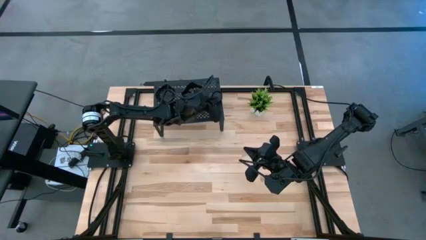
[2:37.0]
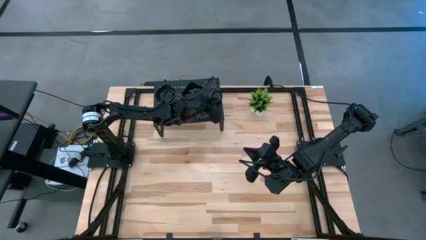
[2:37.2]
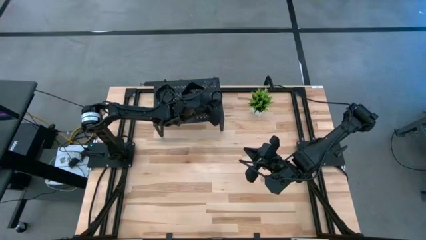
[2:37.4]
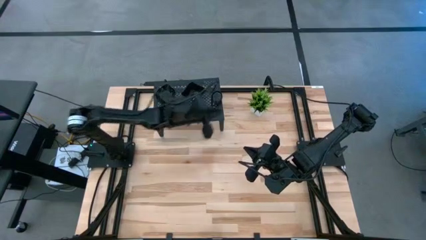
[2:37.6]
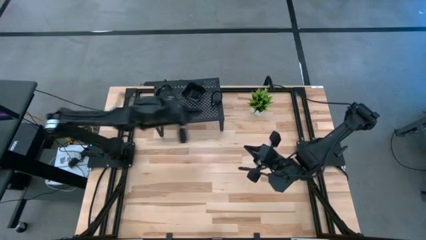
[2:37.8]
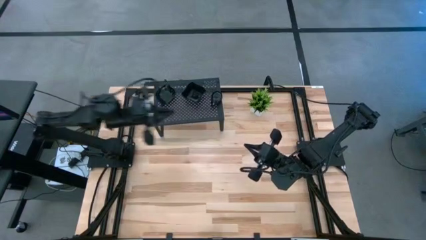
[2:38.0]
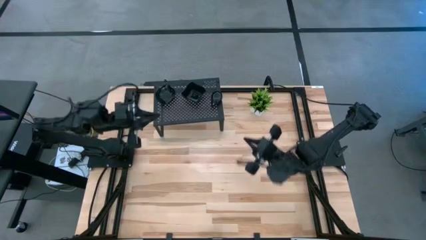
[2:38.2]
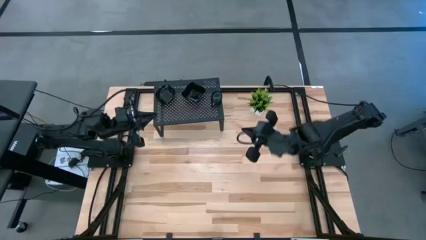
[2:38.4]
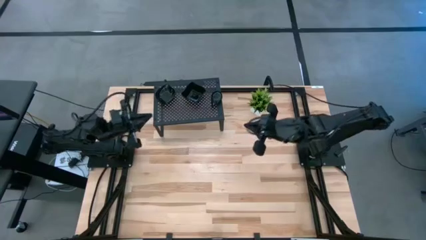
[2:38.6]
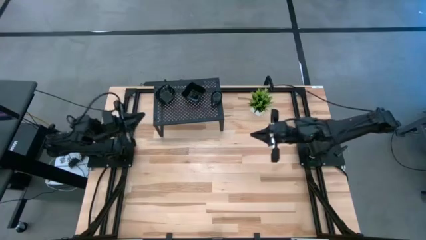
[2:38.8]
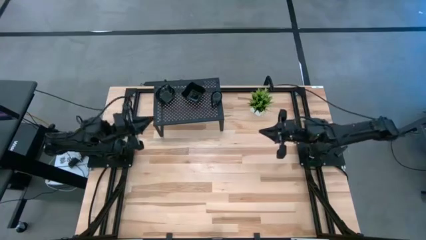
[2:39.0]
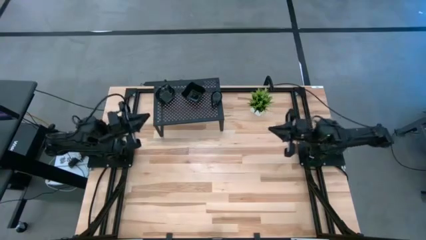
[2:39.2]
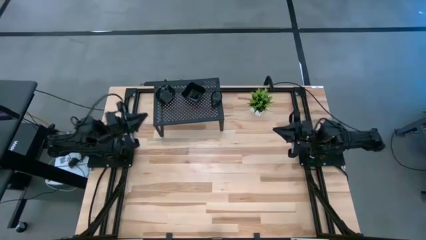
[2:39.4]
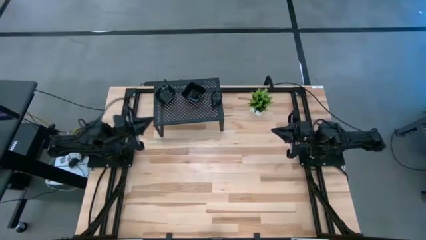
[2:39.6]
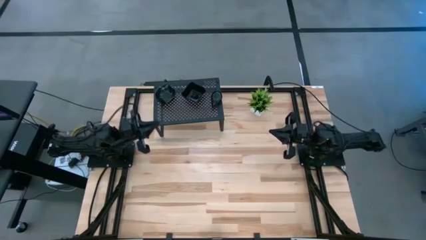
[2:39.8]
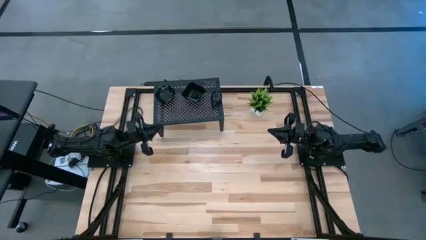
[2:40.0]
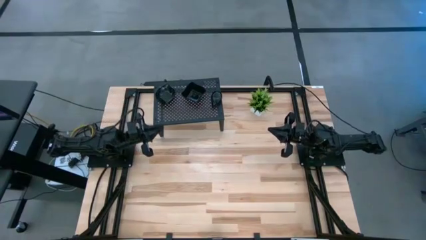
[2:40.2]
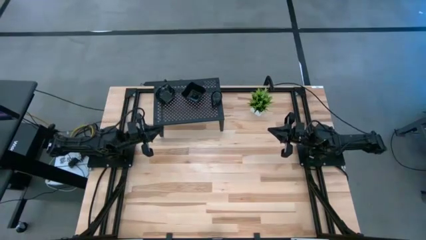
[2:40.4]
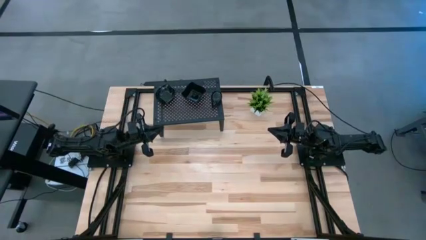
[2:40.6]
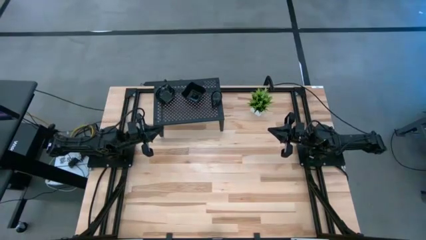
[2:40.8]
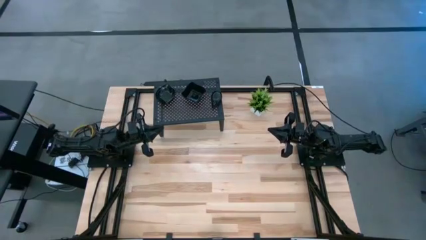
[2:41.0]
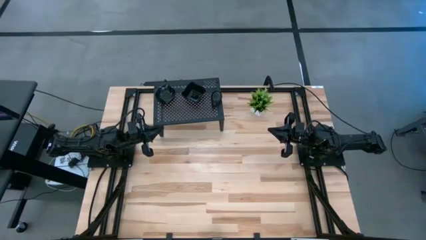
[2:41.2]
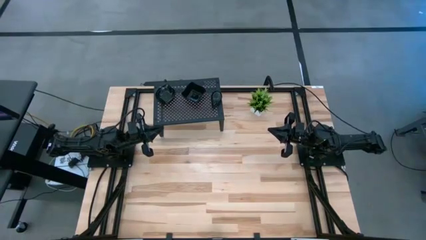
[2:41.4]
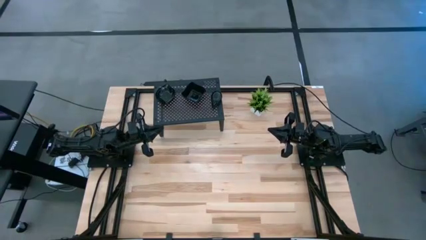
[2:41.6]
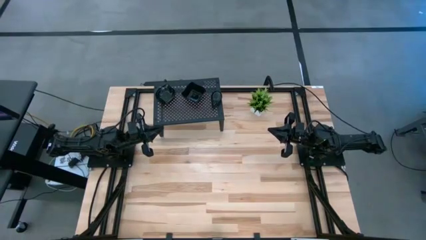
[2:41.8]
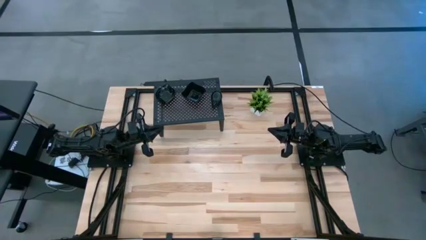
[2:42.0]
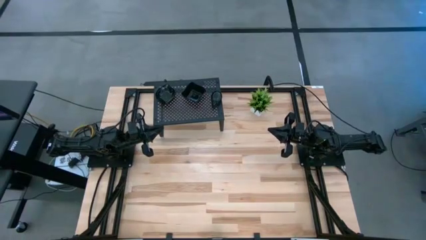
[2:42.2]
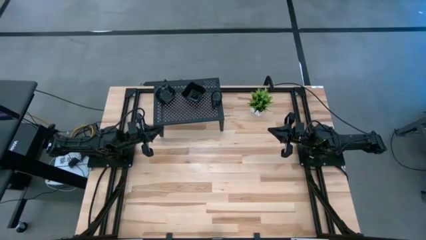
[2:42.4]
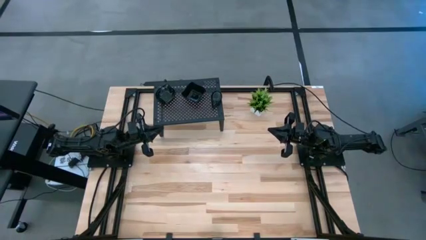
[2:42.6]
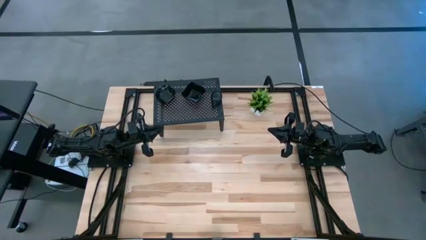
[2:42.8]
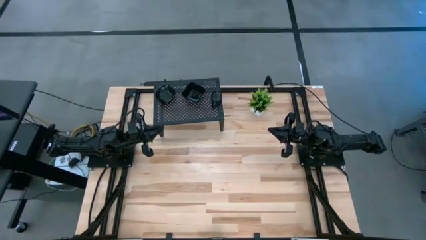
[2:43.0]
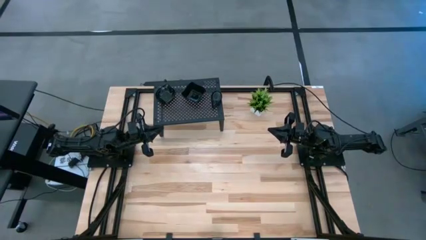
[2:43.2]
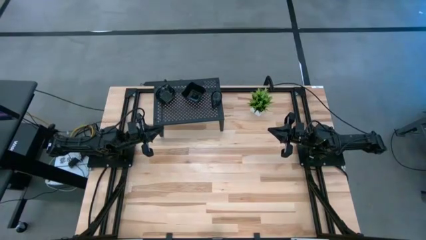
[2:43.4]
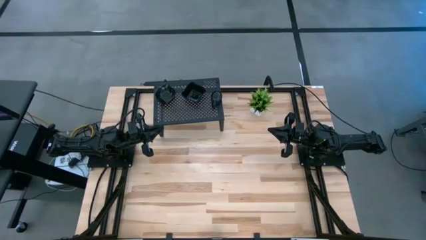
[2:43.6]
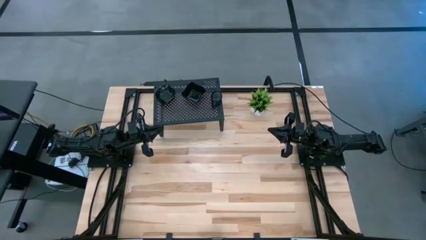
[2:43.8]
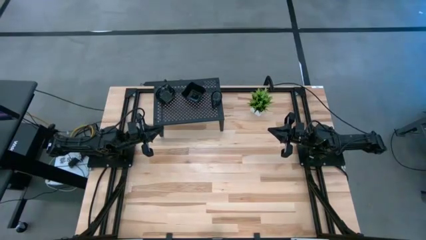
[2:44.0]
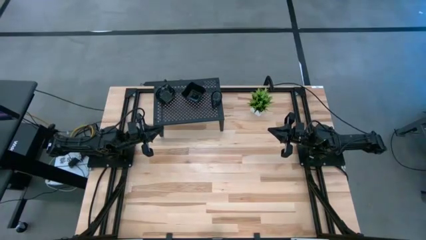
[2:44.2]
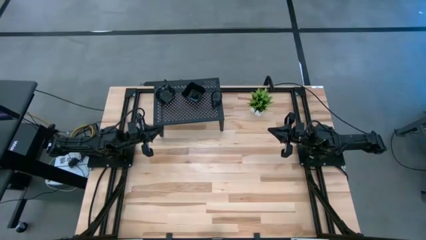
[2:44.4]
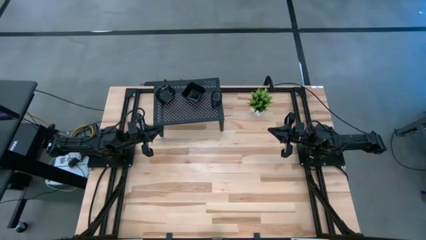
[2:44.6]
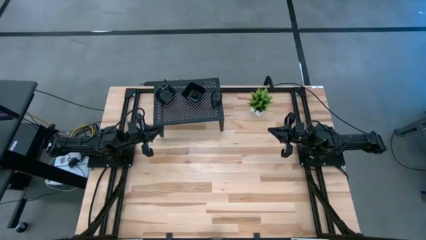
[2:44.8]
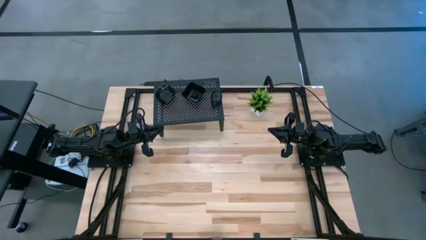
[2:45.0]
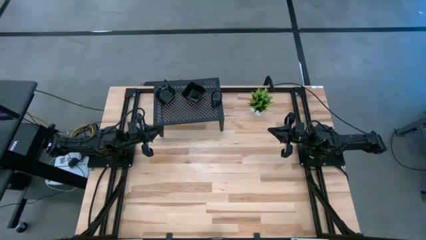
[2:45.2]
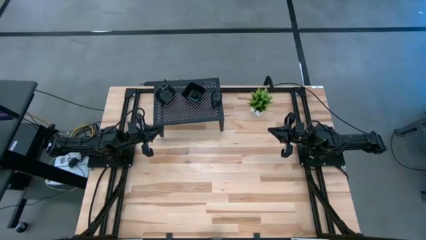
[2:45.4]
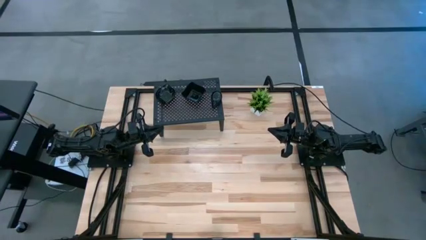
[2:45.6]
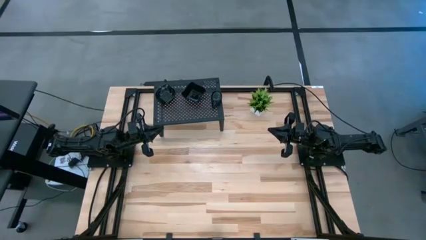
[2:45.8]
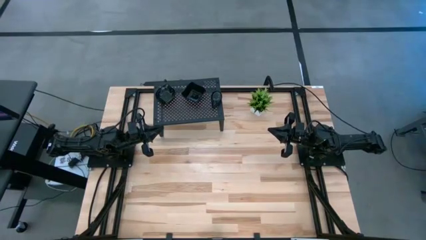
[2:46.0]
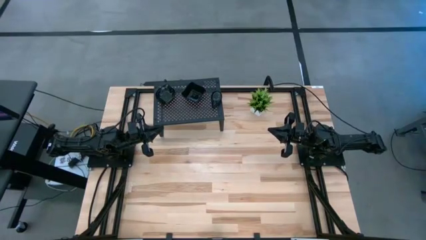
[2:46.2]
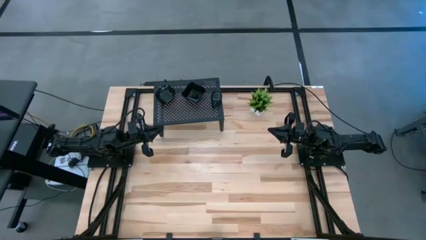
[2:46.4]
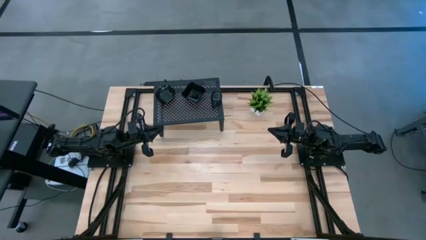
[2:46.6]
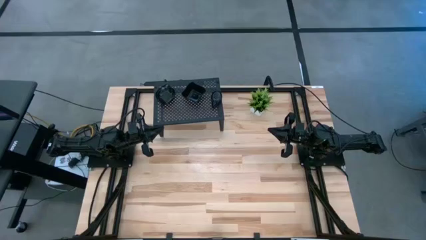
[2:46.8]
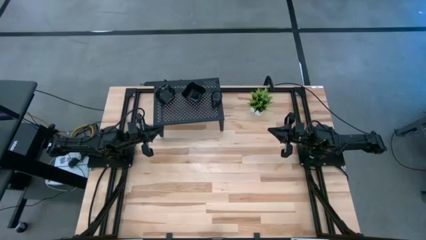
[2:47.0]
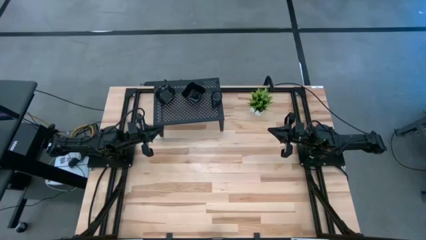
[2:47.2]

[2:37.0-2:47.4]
Task: Pick & Place Mini shaped plates
Return to Home Position
